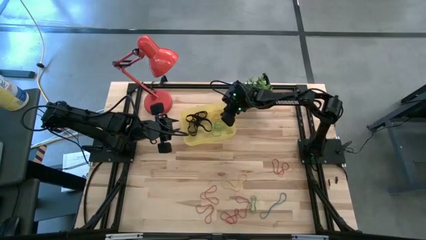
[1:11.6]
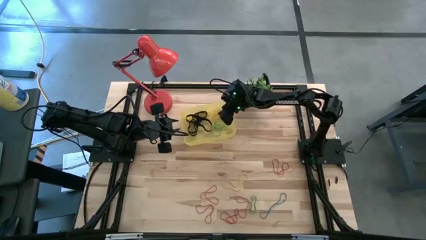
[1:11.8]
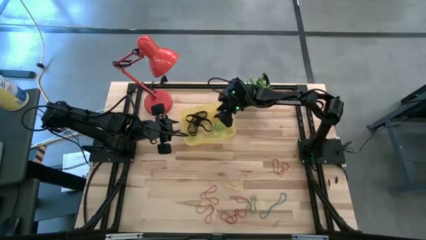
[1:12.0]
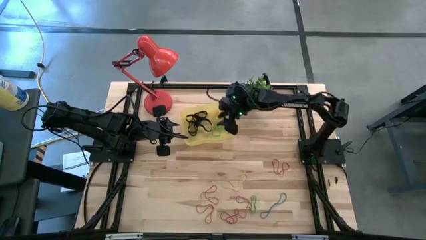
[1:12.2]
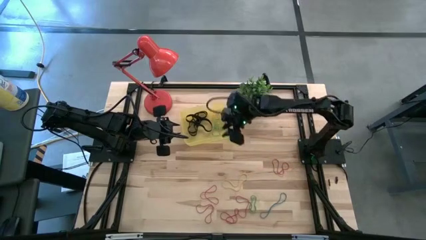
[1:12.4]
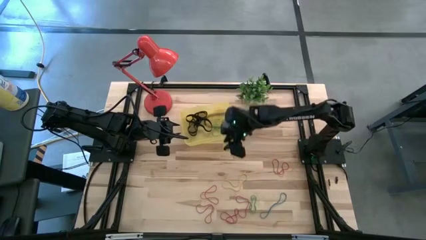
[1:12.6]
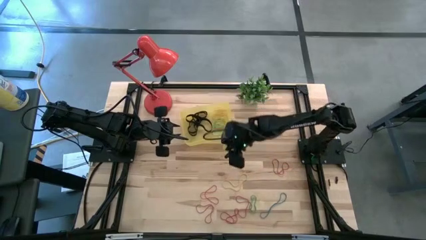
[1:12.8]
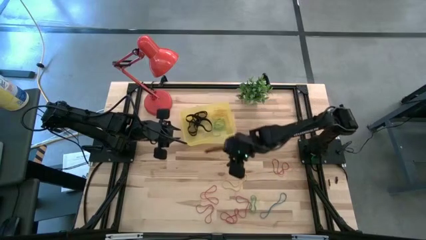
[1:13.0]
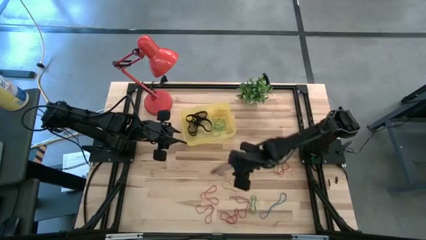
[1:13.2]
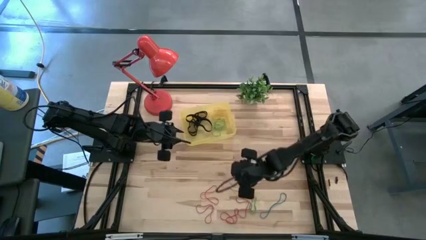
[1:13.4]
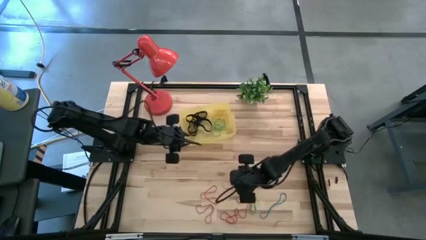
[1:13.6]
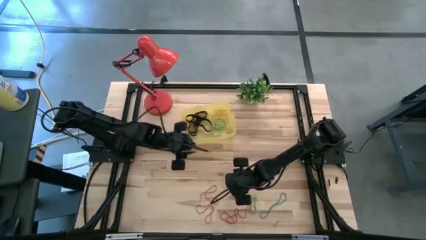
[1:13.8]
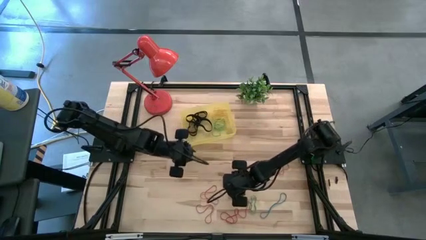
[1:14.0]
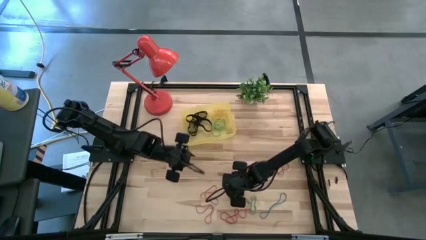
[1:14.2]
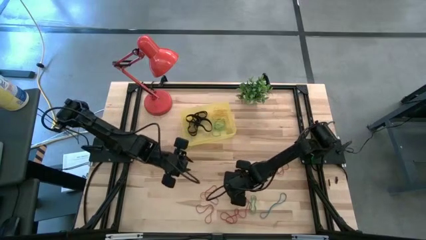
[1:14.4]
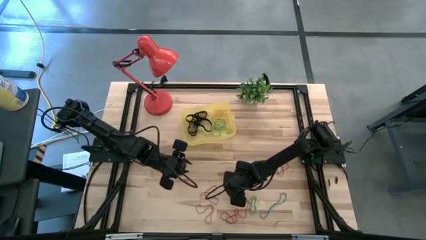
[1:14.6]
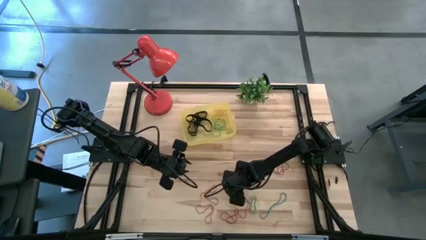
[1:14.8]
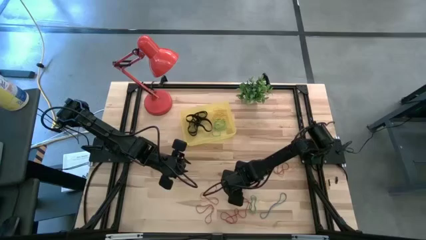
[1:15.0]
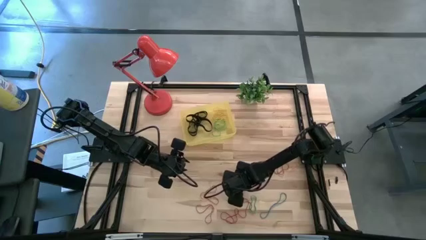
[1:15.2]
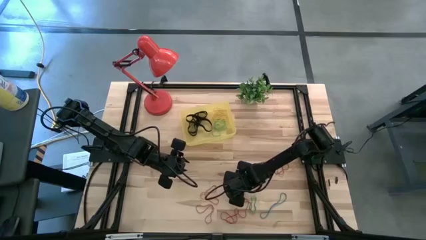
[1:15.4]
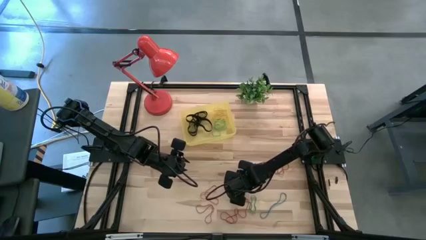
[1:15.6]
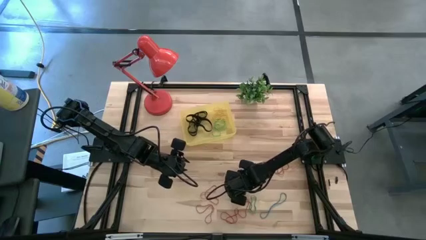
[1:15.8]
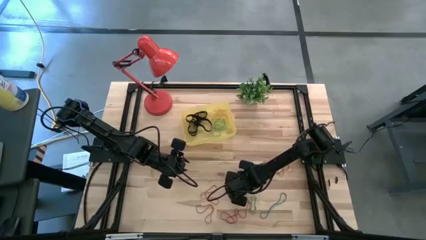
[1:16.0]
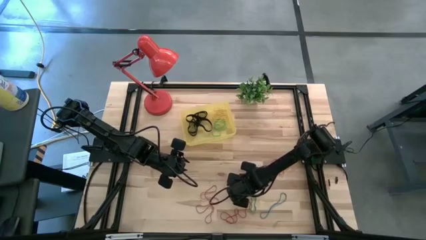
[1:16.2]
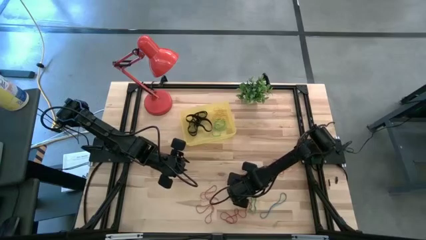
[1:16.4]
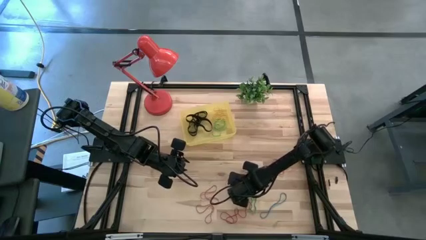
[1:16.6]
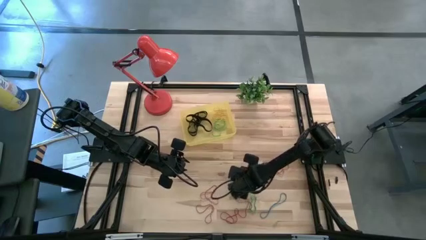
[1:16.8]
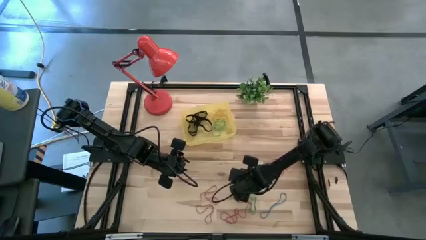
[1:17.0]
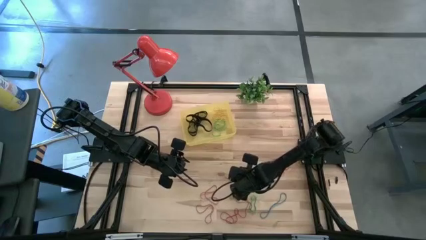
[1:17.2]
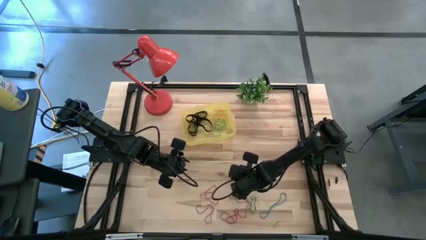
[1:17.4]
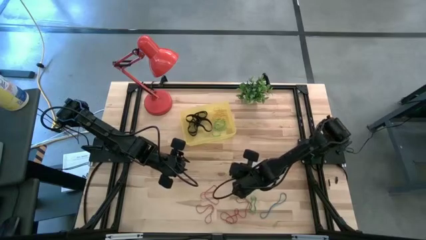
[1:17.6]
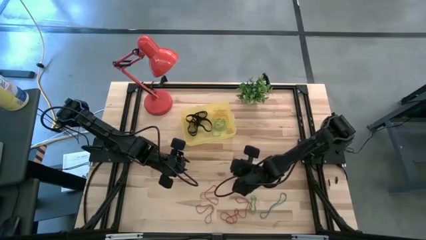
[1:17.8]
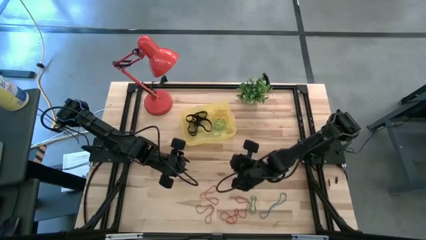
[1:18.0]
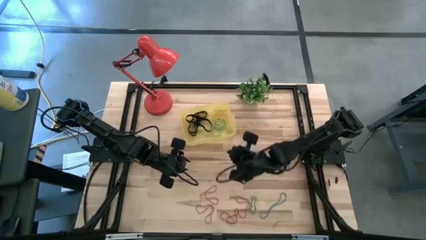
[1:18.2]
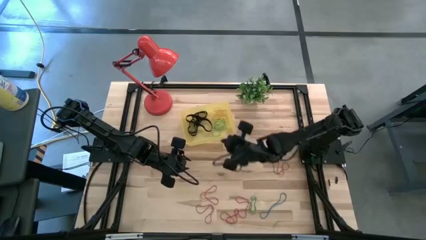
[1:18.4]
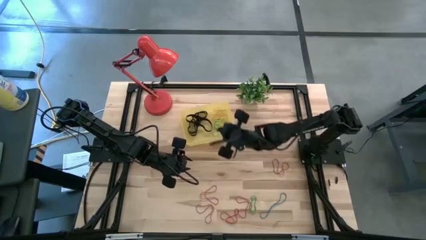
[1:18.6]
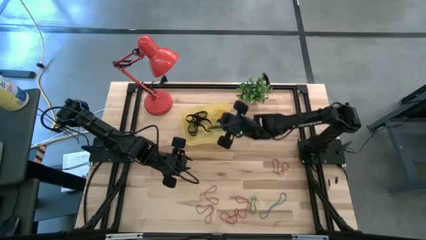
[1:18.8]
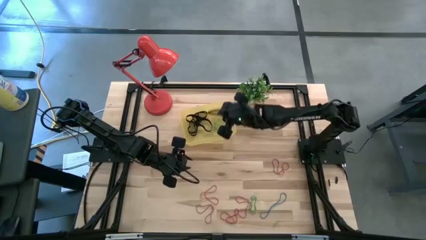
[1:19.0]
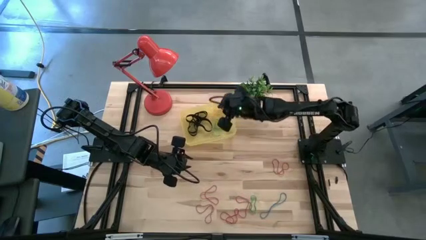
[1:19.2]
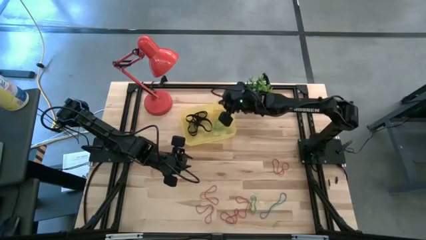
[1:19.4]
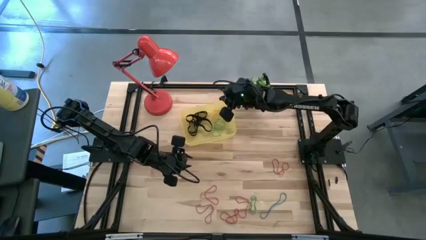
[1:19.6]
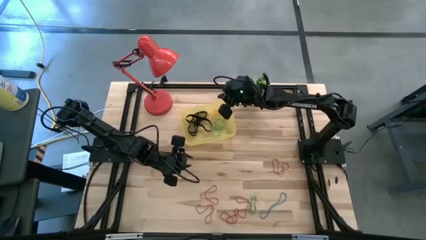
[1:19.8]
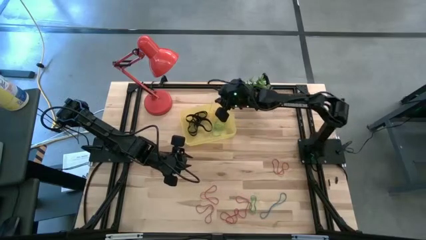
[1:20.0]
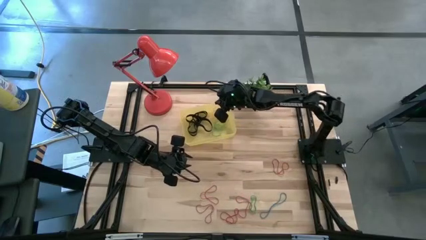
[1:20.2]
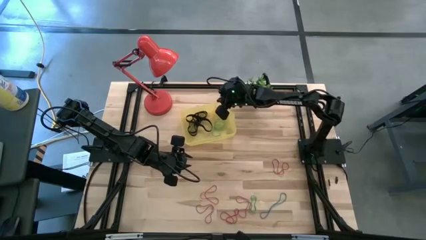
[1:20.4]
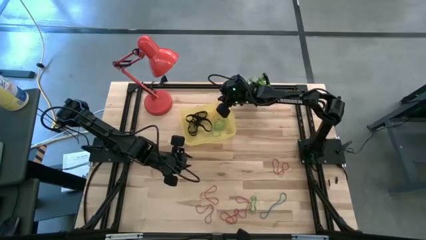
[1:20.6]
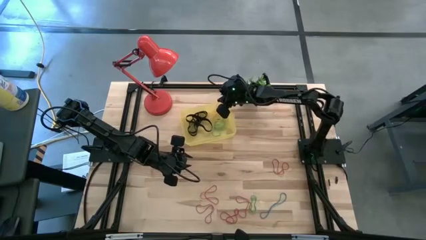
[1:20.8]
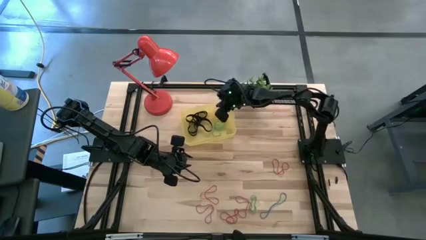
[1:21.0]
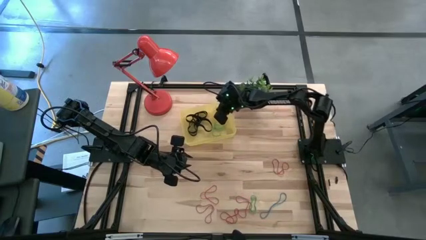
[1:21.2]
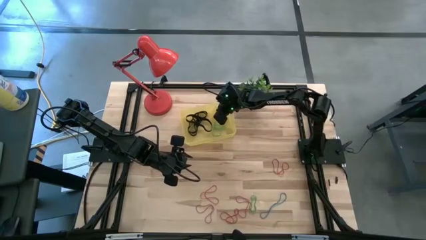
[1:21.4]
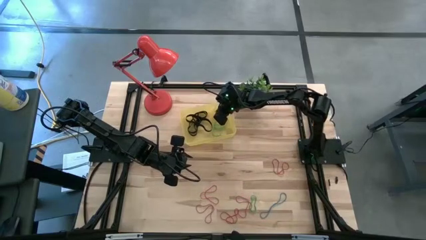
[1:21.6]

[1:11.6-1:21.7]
Task: Pick and place rubber bands into bin
Put the yellow rubber band into the yellow bin

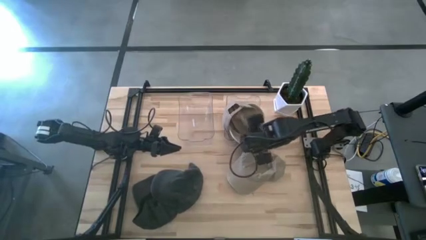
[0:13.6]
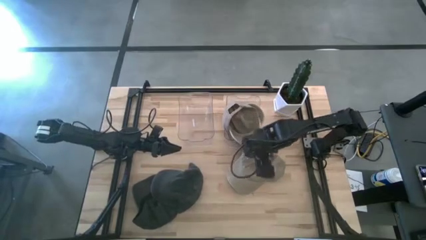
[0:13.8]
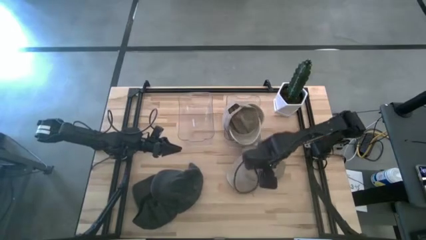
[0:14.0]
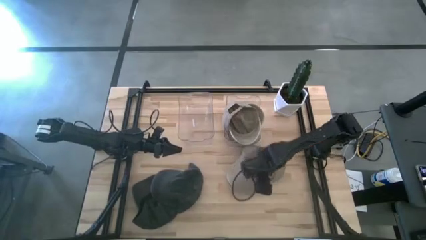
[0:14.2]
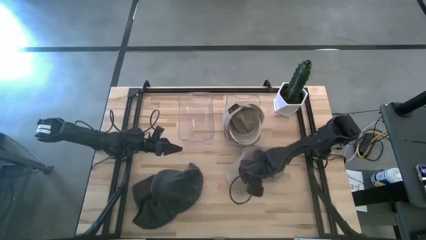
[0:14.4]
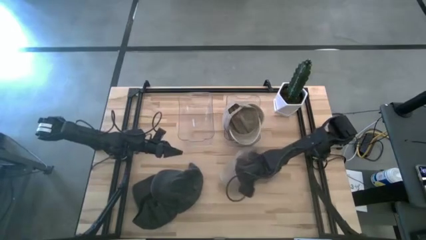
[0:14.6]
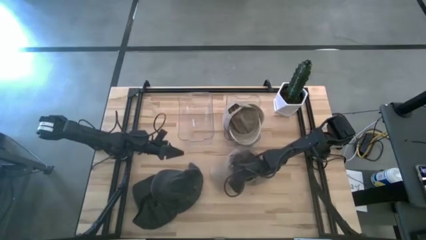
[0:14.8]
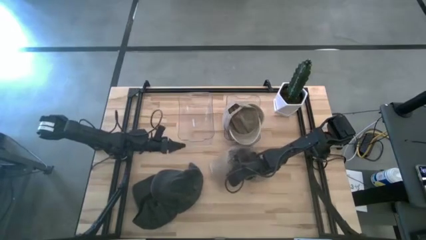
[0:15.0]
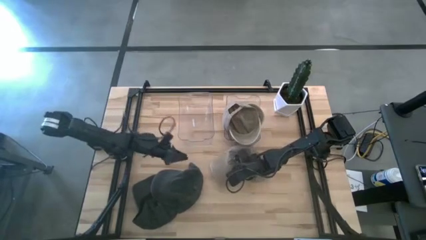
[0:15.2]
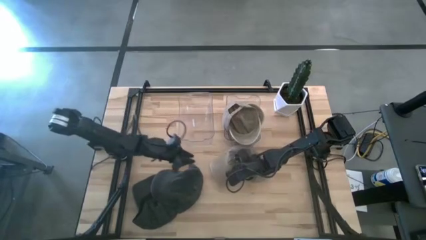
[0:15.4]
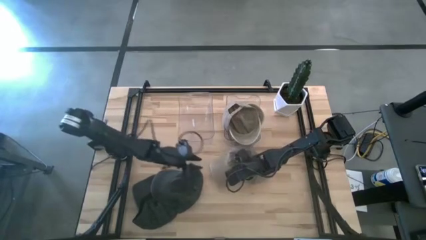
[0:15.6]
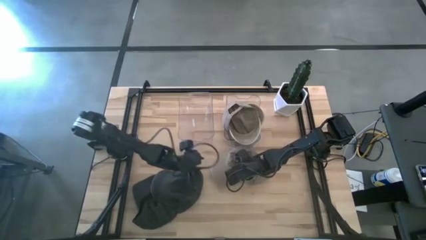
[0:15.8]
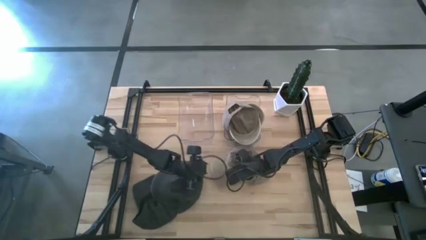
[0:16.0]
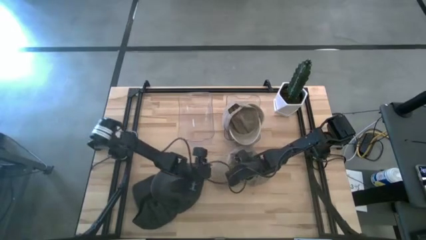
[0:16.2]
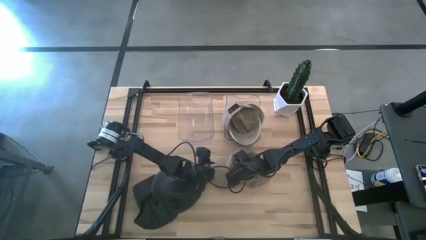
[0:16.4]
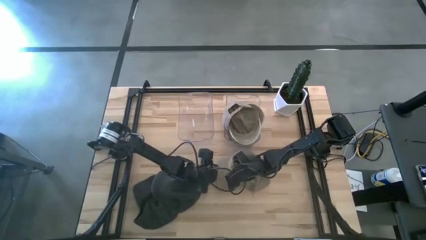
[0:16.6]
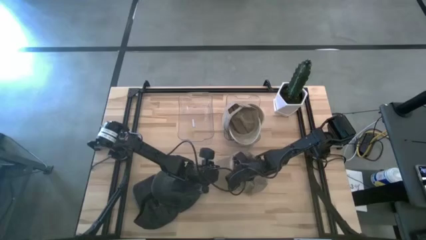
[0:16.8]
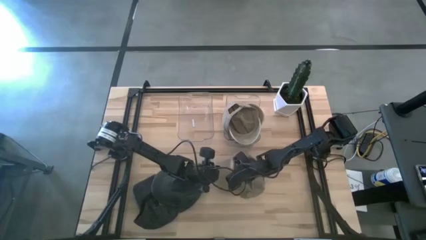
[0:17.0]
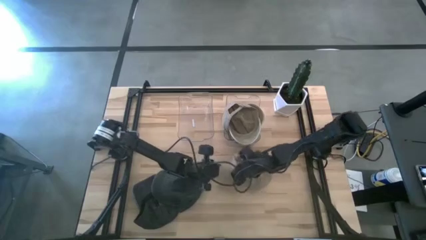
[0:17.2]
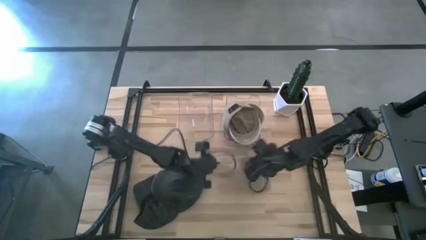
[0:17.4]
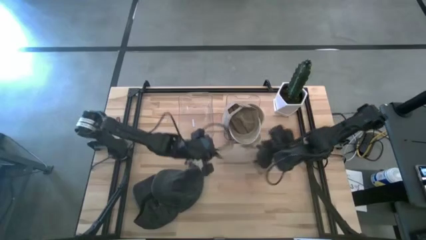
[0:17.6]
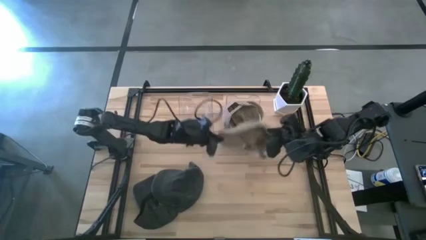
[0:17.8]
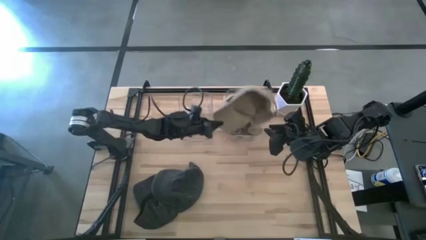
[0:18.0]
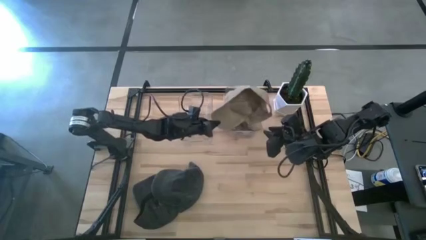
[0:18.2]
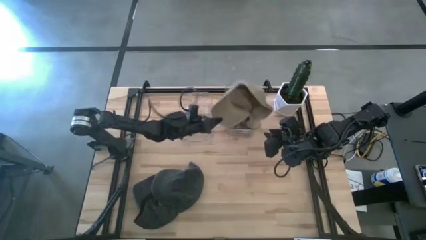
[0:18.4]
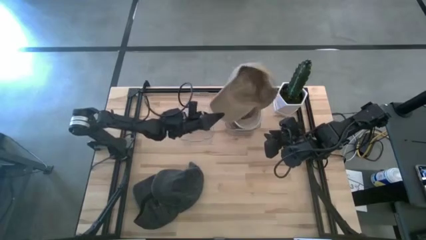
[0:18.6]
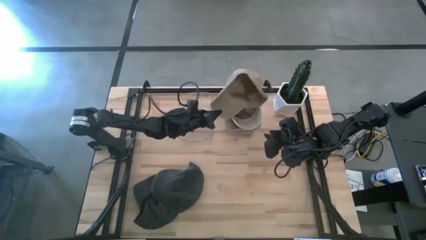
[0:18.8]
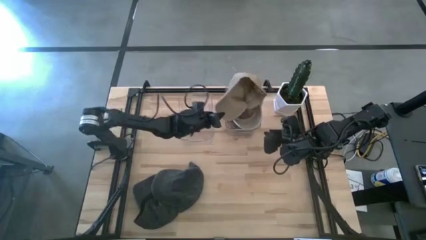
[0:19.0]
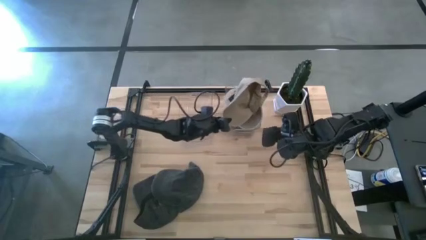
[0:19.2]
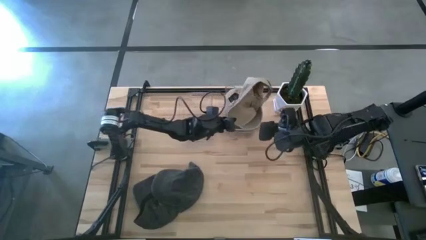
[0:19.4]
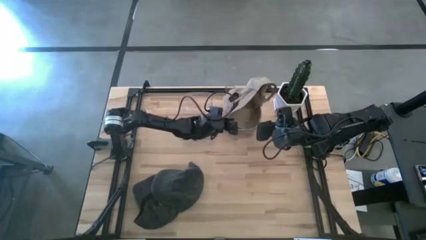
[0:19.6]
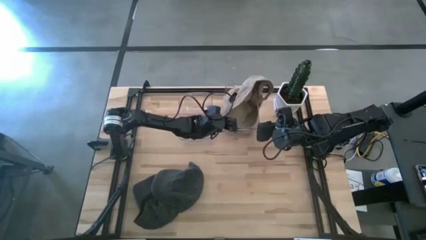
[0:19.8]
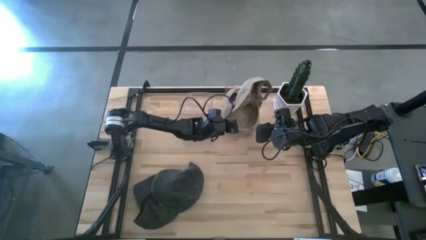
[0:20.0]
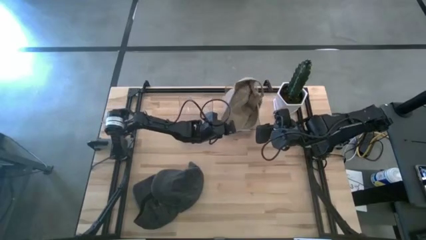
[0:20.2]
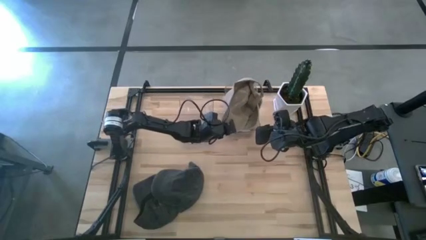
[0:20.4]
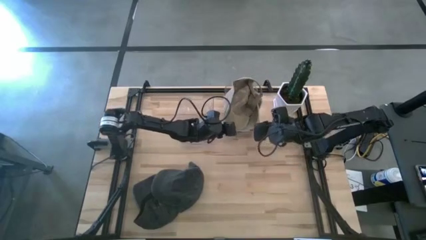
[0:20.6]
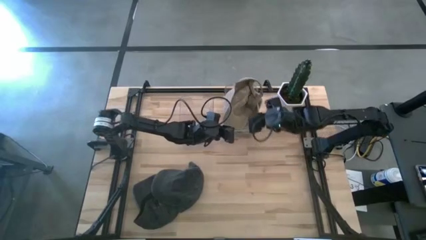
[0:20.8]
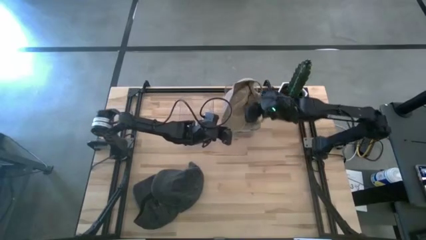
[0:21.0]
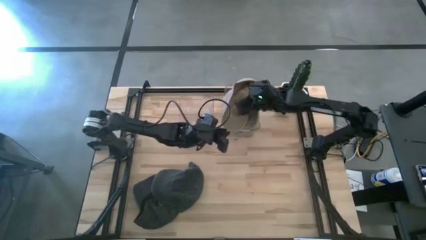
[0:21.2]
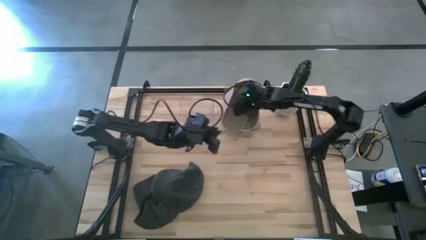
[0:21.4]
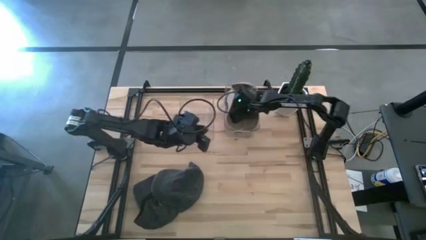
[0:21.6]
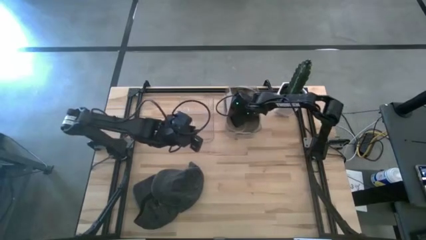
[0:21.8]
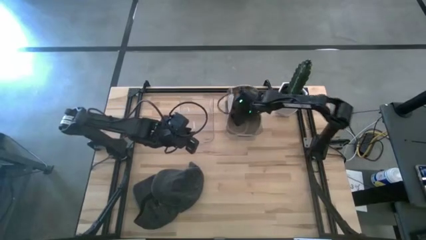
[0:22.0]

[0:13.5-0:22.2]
Task: Pick & Place hat
Put the brown cap into the right transparent bin
